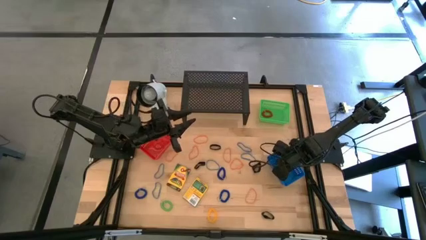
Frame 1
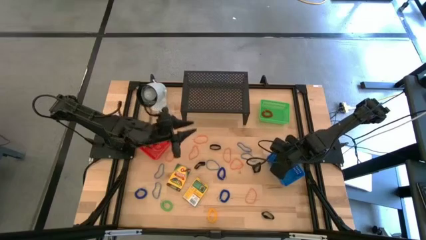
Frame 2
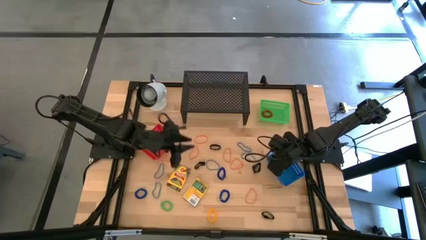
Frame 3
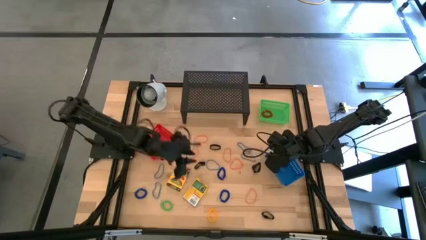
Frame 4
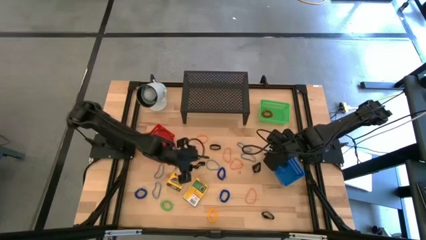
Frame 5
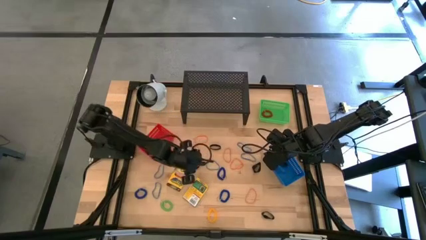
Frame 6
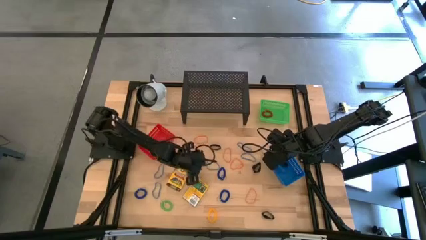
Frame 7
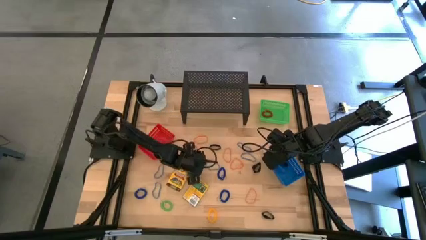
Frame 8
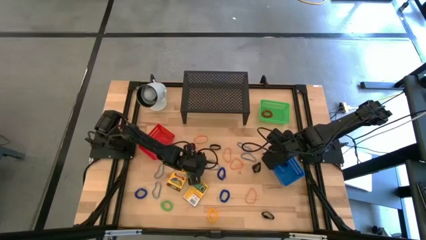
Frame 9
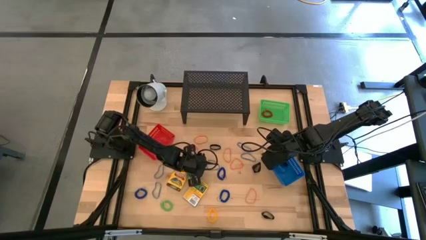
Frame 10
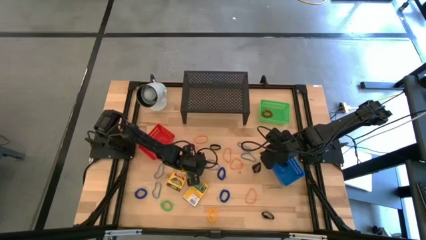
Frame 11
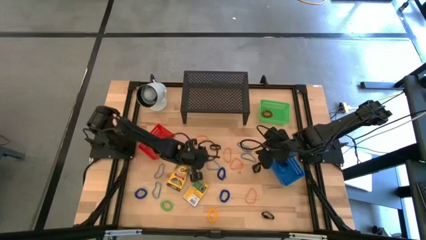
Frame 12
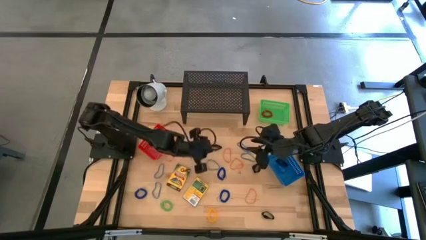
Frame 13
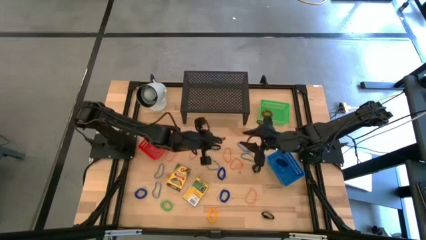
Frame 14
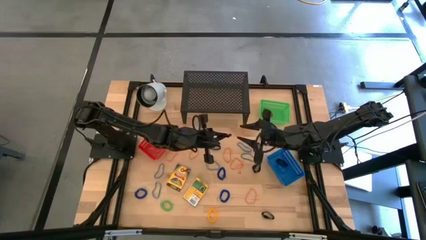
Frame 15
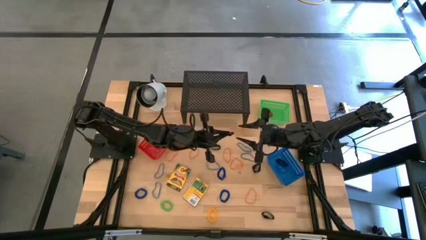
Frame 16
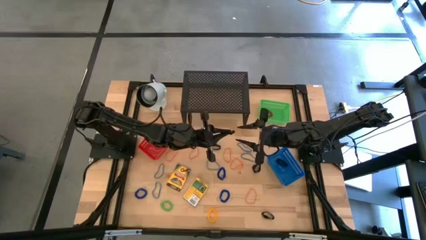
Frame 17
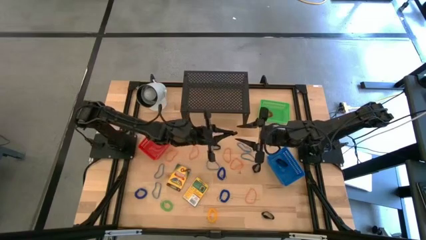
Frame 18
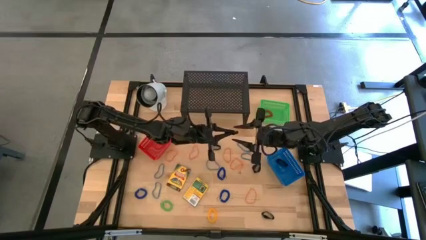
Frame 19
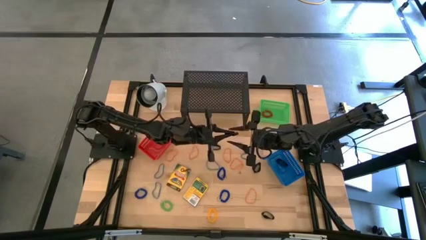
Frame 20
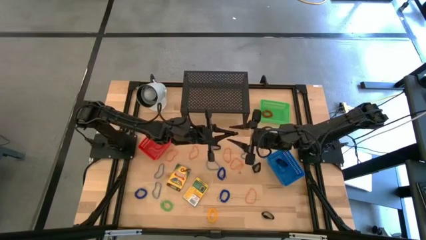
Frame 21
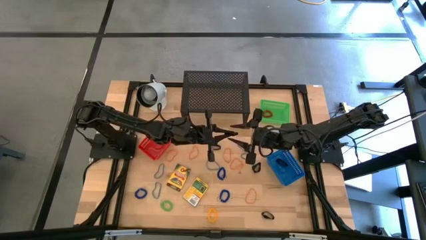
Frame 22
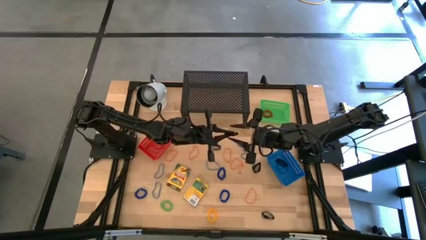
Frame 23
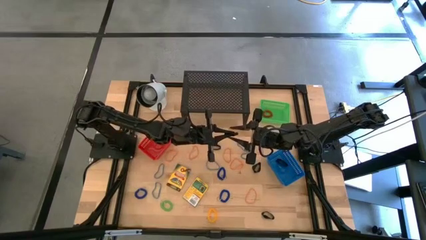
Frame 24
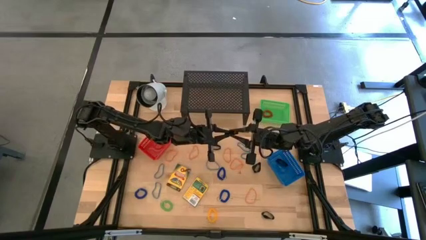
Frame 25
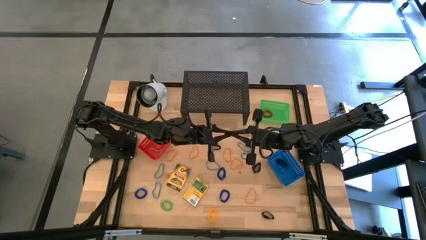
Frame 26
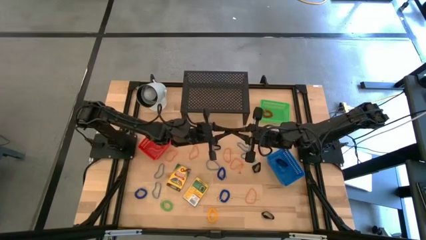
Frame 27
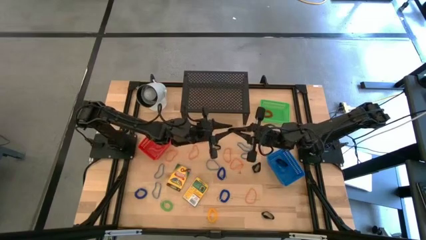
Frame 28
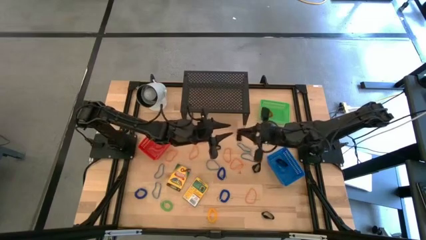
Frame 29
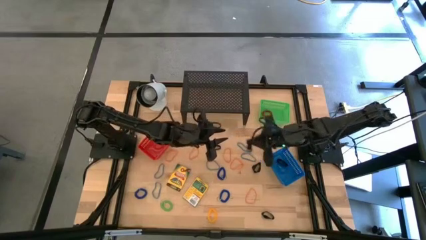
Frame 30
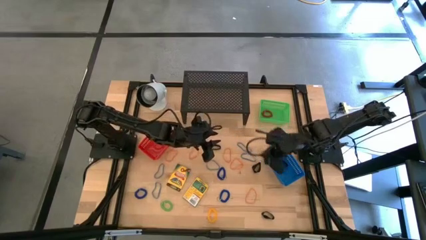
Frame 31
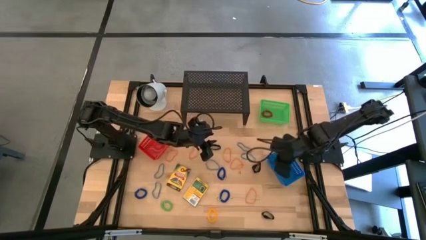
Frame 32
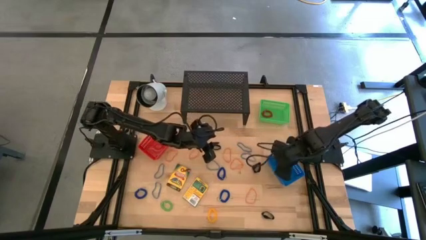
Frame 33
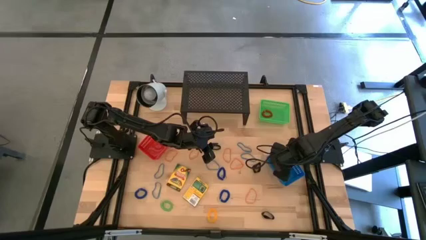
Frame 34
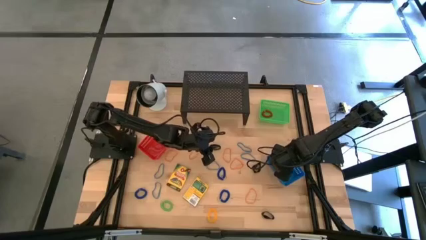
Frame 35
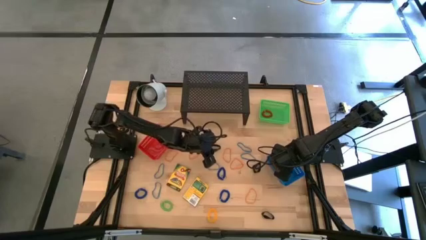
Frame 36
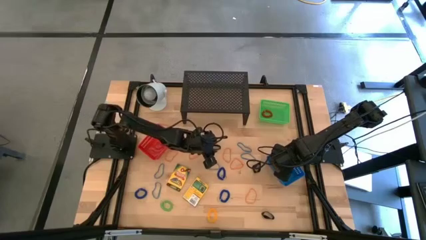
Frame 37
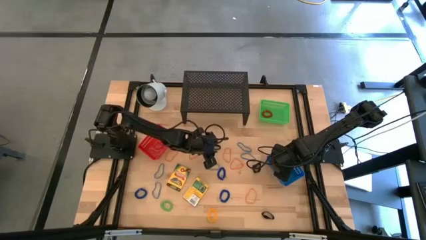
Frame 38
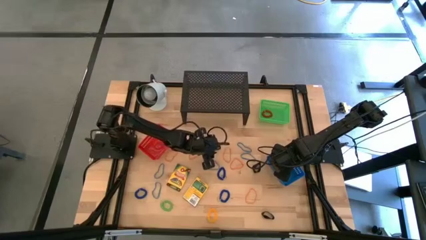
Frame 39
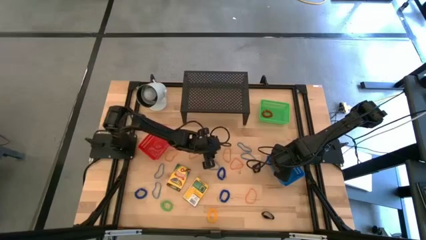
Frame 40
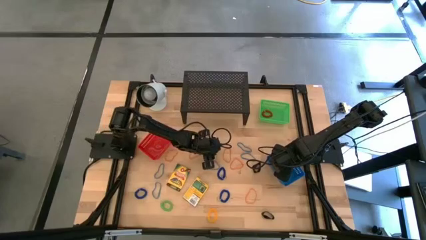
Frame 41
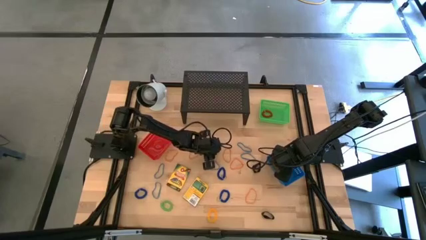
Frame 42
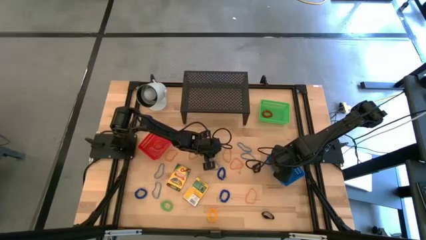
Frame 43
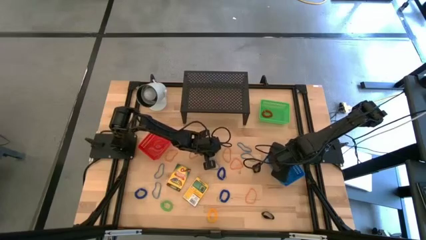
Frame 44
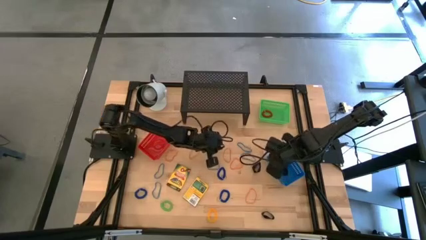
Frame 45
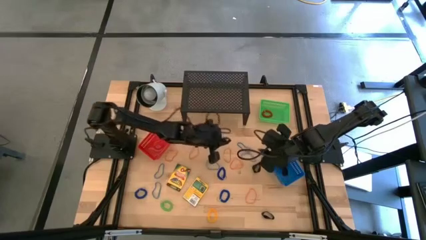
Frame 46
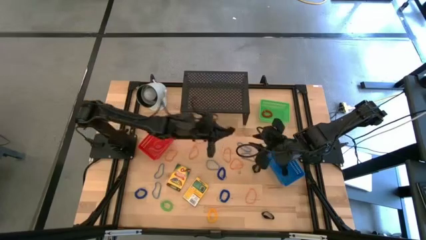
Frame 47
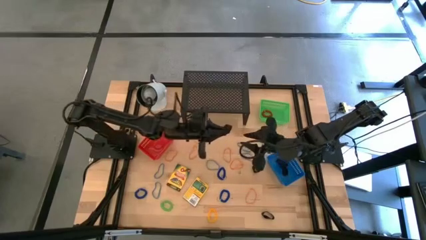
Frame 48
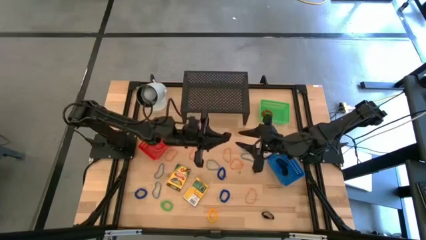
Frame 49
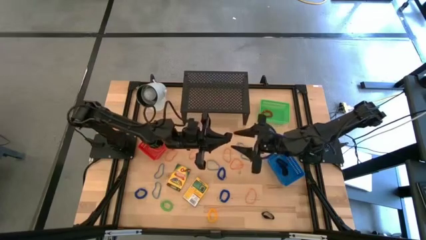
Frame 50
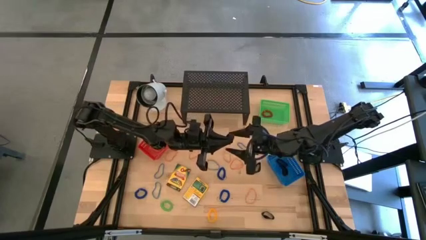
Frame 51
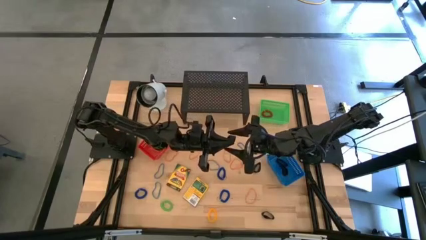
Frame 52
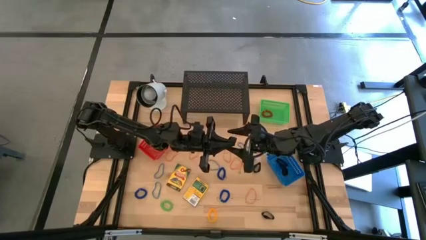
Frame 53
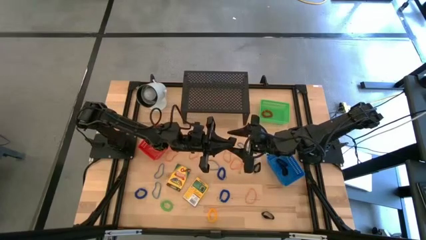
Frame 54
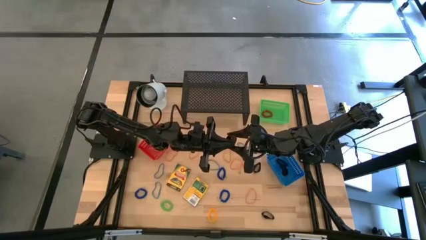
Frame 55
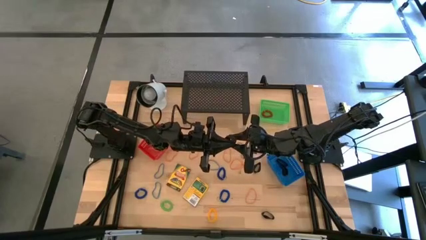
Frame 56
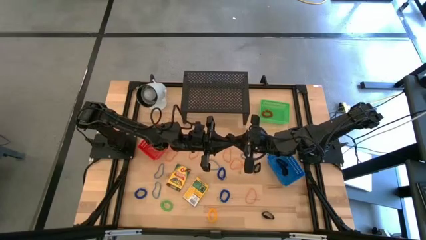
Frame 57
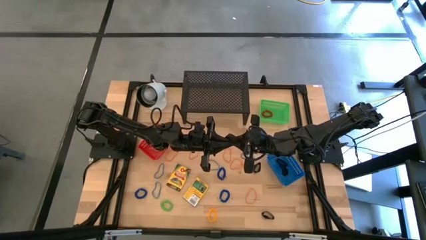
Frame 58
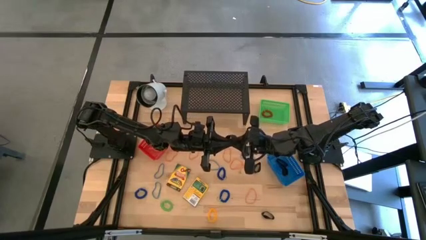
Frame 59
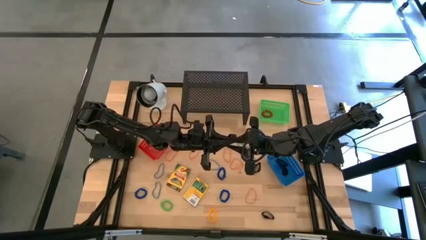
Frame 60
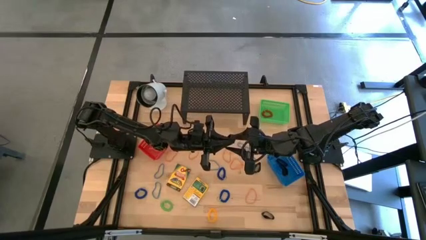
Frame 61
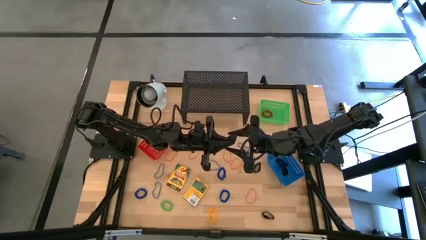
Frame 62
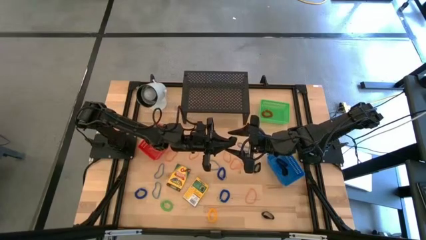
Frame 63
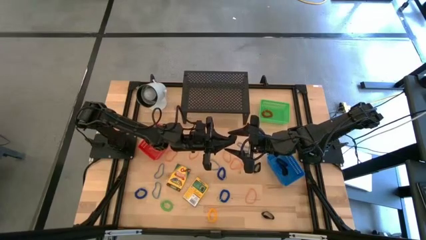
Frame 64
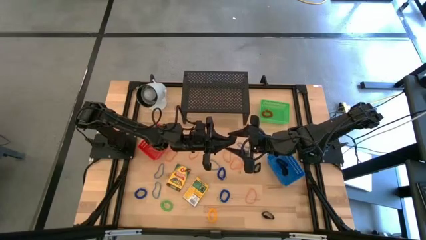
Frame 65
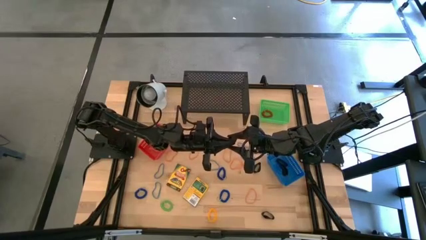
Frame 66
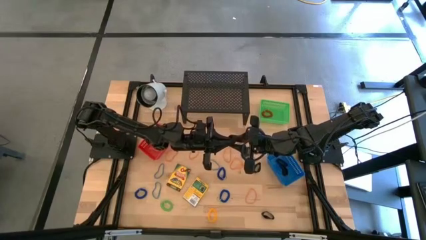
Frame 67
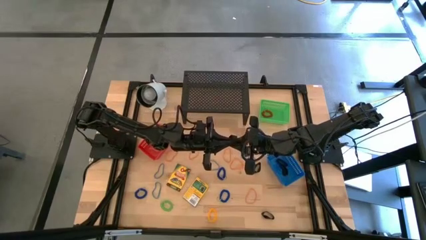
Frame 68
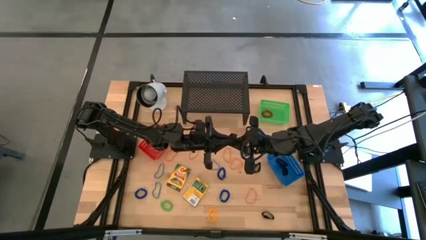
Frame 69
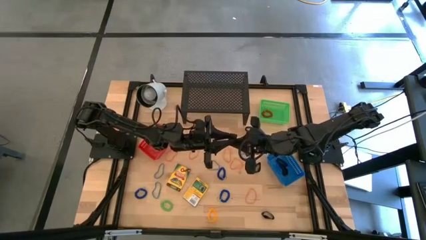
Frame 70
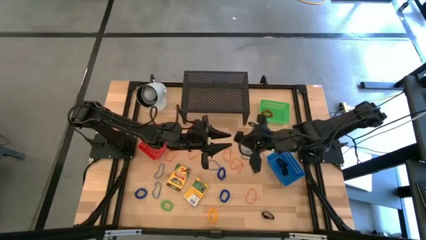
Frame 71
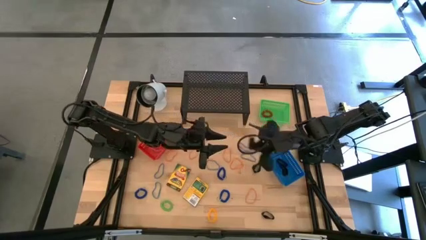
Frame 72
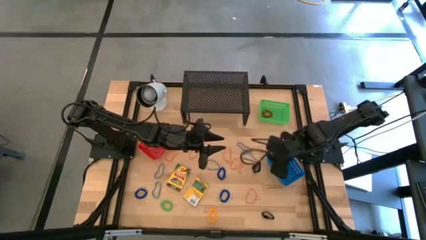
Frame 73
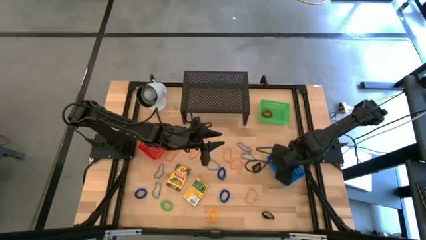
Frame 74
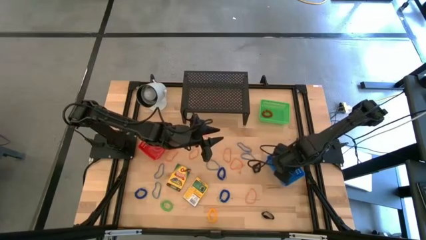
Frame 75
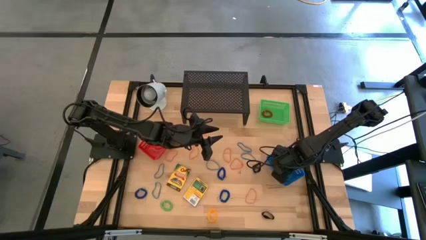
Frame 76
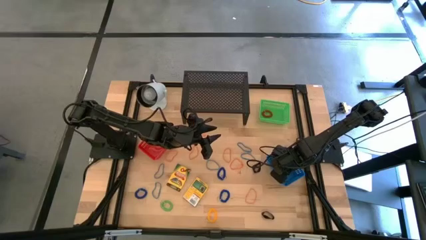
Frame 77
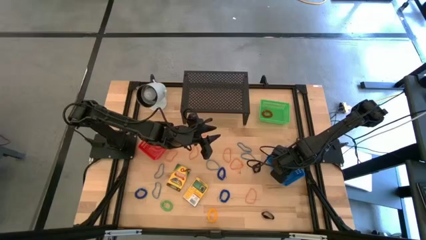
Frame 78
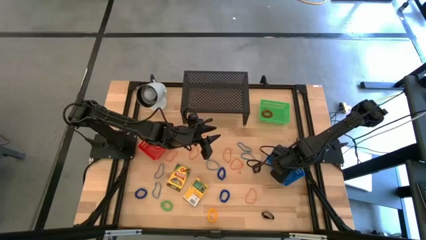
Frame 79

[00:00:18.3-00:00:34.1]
Task: Pick & Place Office Desk Supplies
Put the black rubber band into the blue bin
